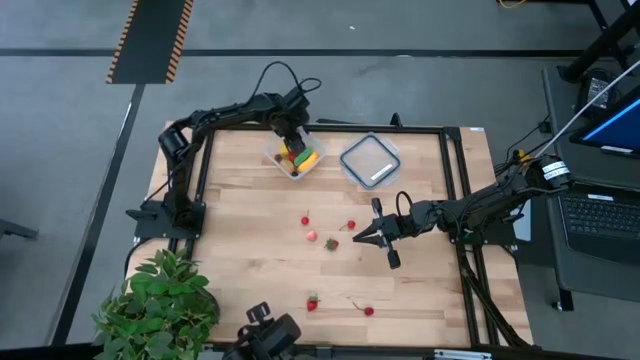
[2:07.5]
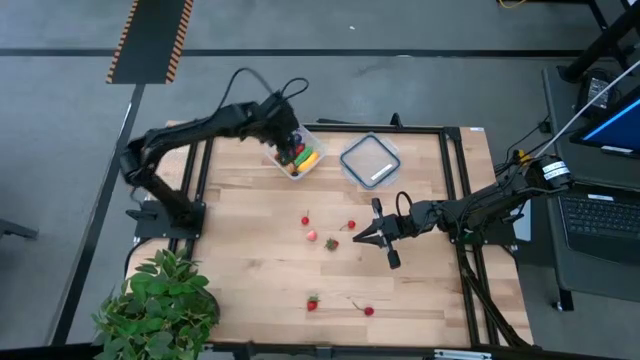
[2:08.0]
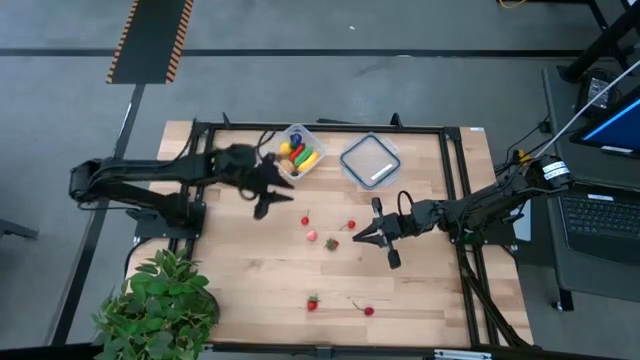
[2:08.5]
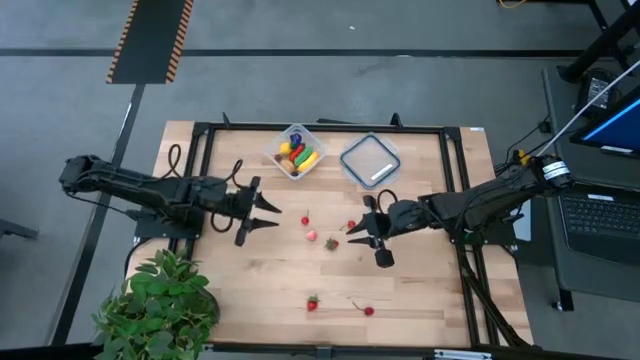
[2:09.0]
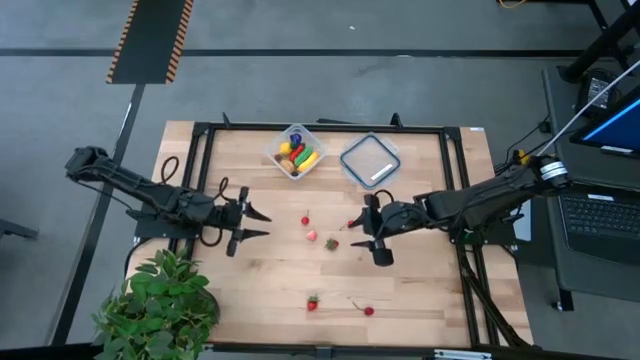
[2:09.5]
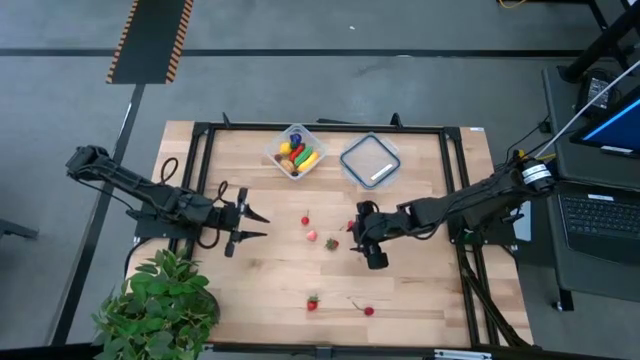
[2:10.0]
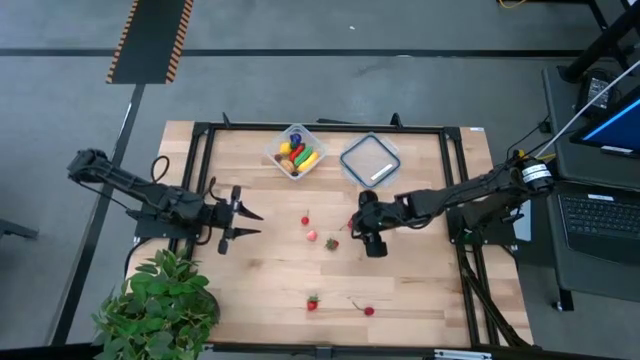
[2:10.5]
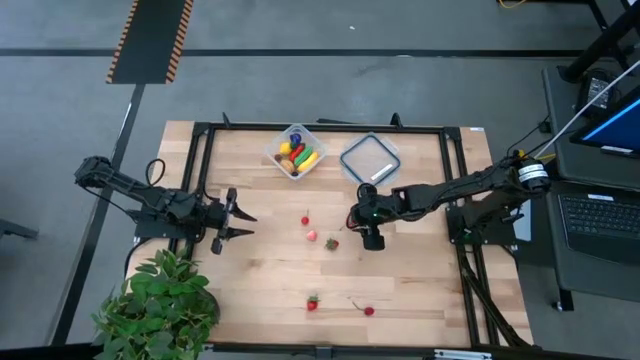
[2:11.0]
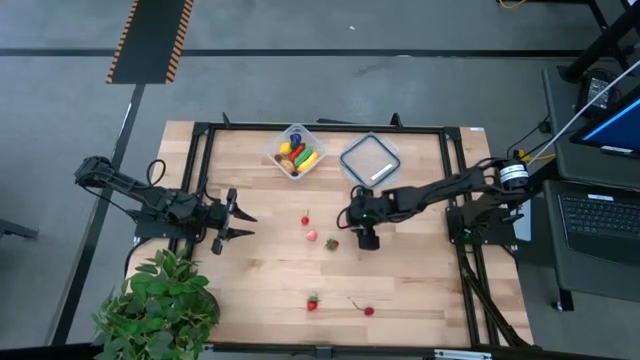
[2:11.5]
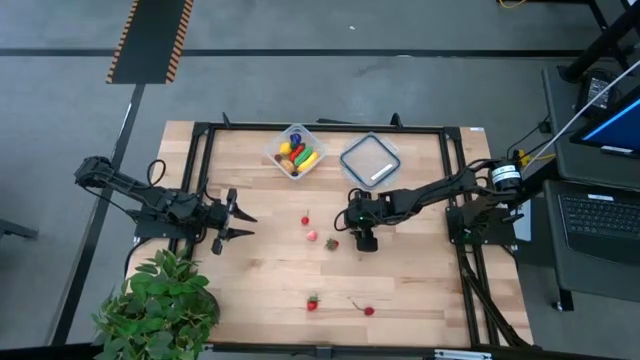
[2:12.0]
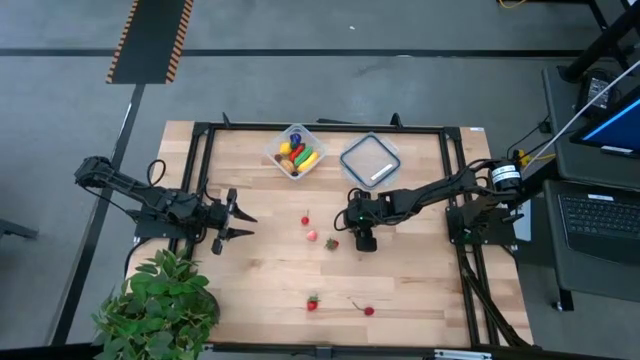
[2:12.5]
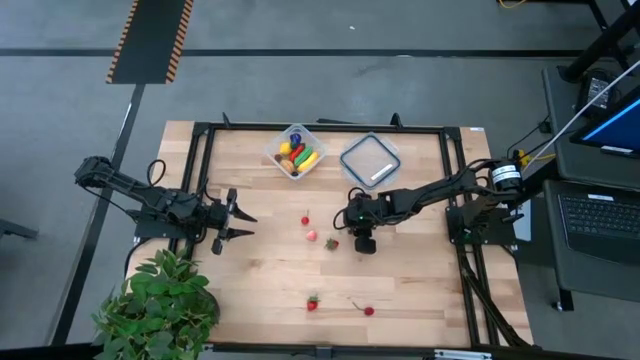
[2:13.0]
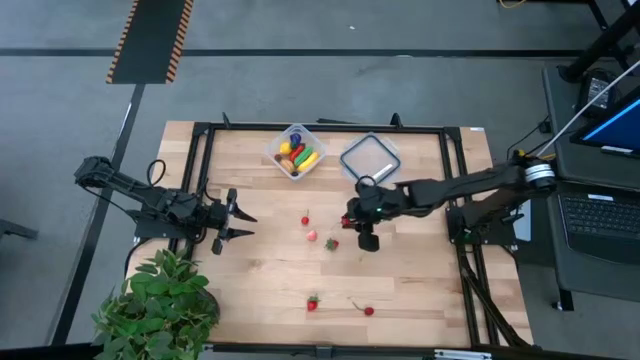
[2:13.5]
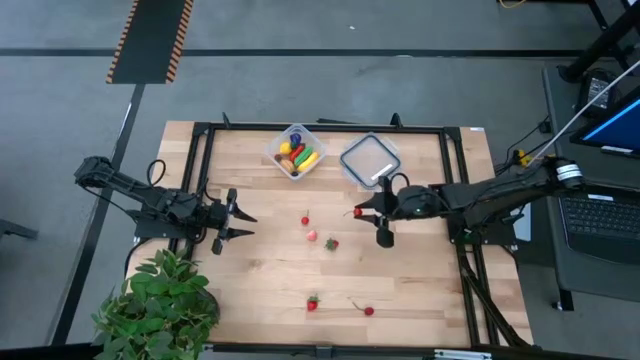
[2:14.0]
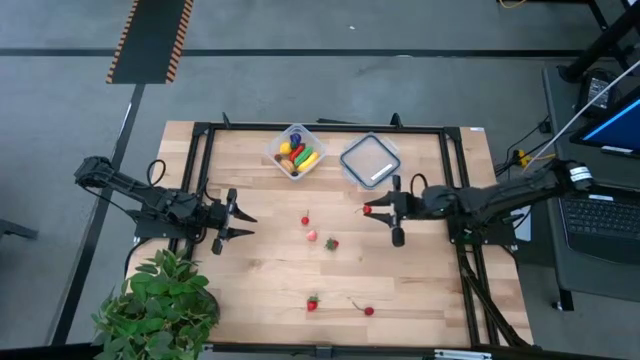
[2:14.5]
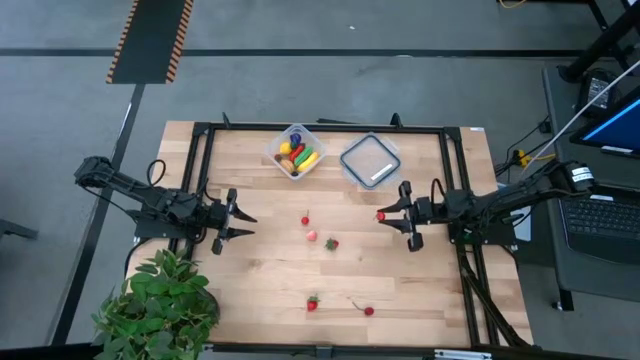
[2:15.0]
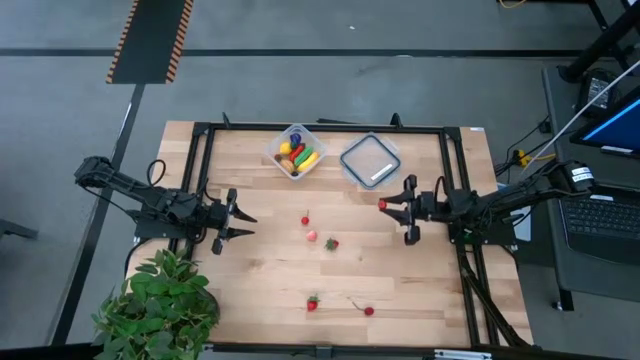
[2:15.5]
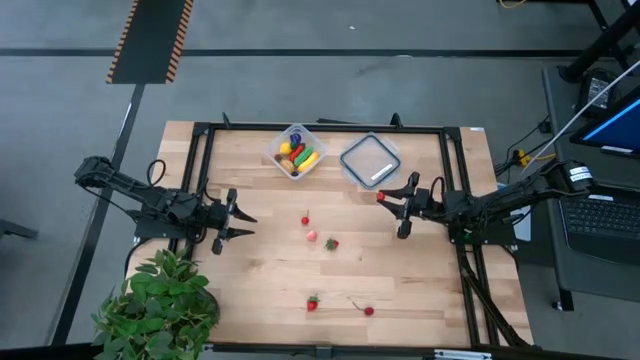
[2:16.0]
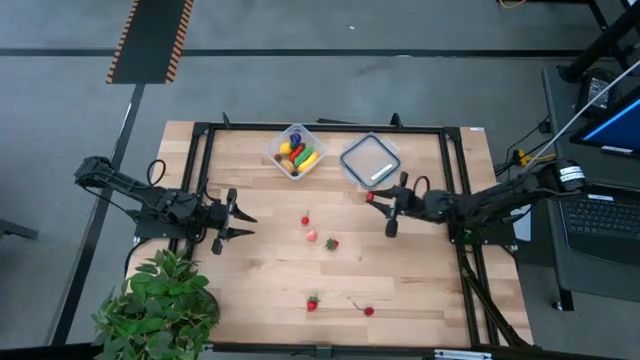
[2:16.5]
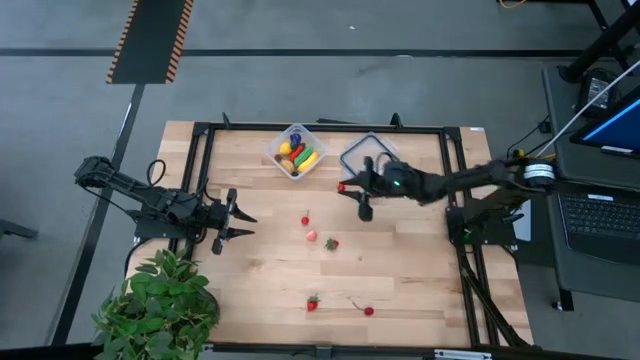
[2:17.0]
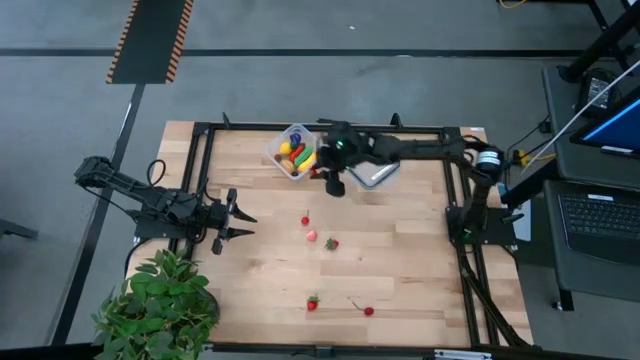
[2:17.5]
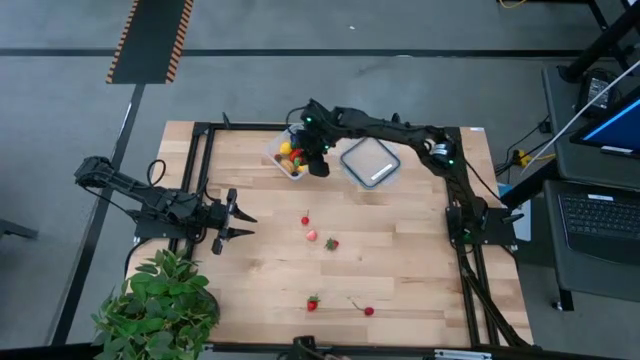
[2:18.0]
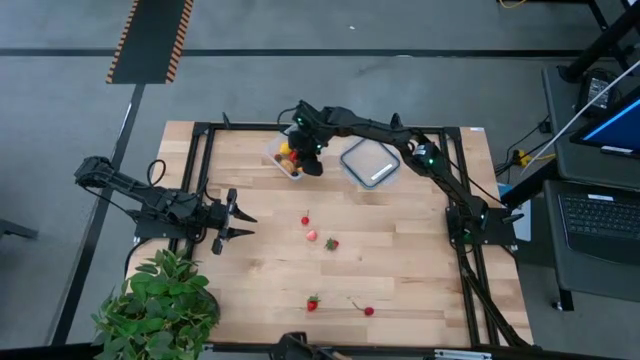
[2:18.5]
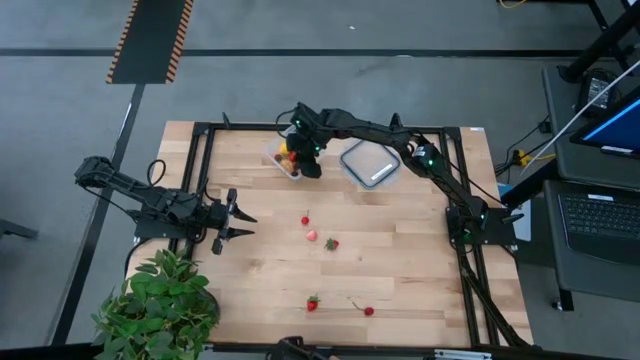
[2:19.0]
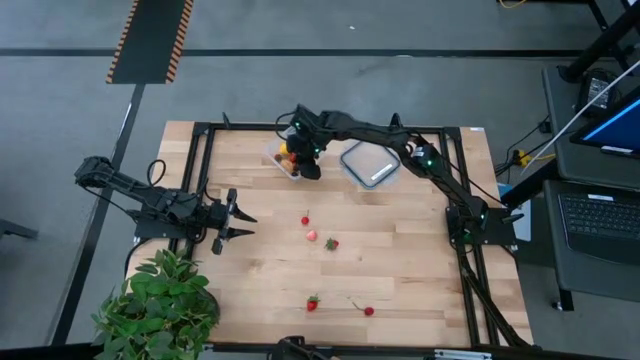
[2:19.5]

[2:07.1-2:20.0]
Task: Pick and placing Produce into tupperware
Put the top right cherry into the transparent container

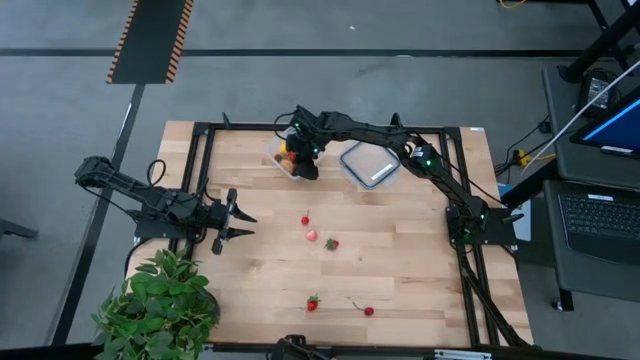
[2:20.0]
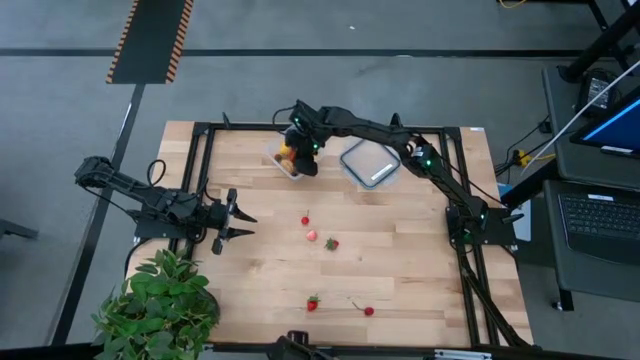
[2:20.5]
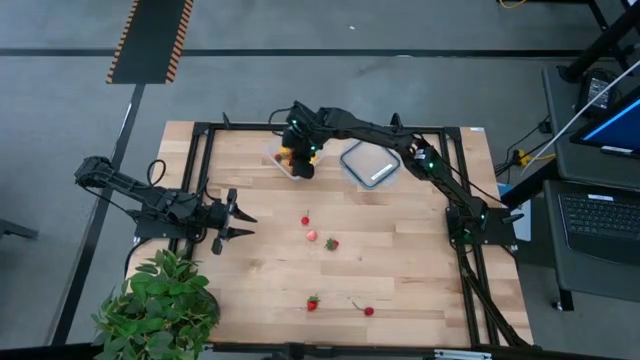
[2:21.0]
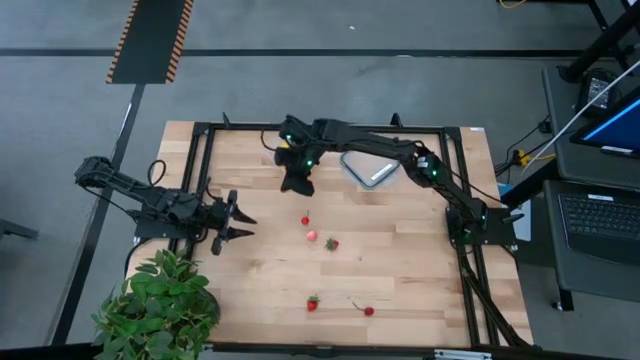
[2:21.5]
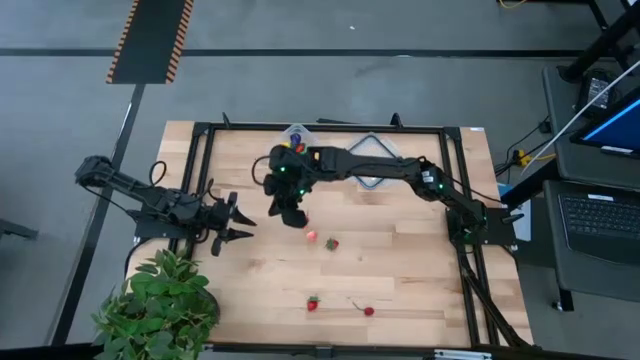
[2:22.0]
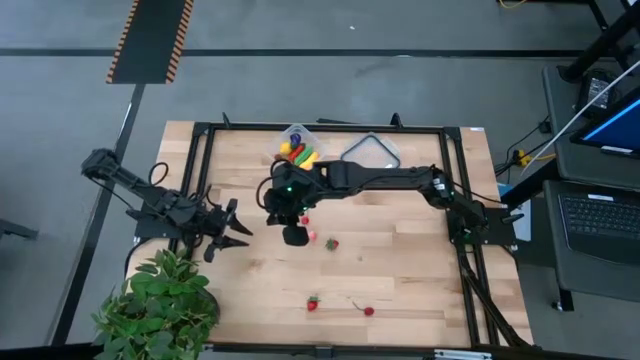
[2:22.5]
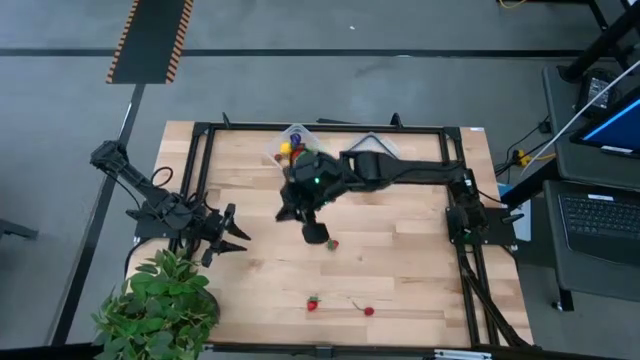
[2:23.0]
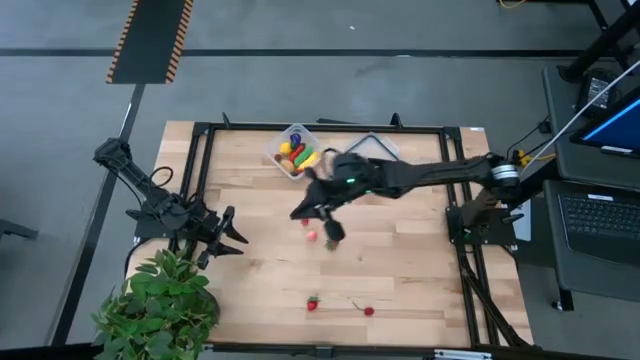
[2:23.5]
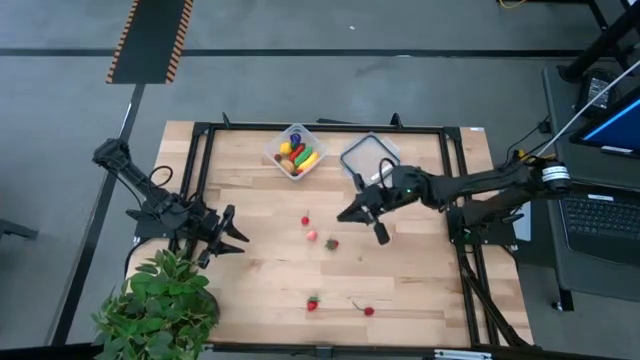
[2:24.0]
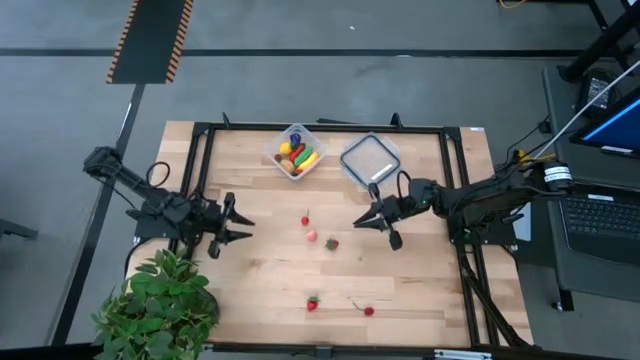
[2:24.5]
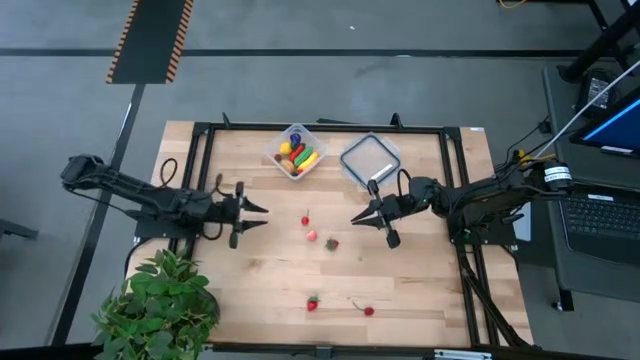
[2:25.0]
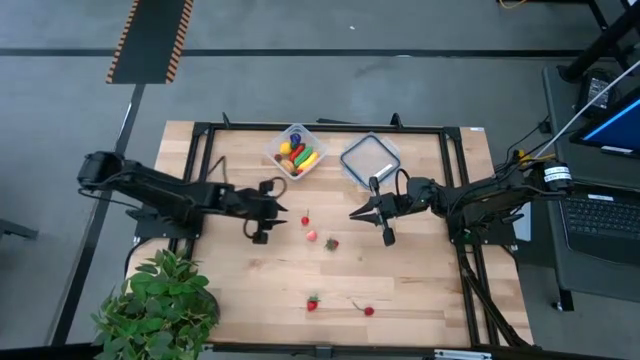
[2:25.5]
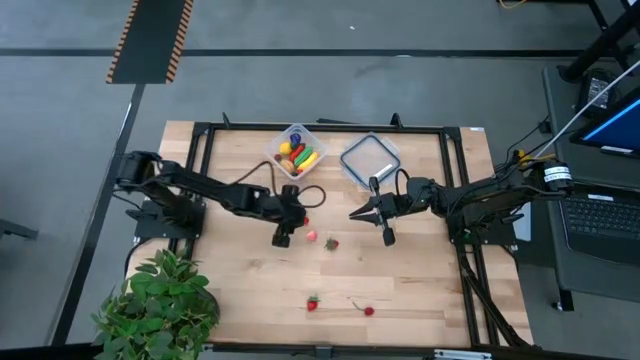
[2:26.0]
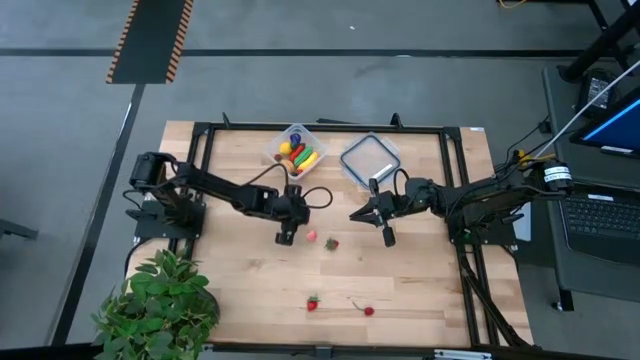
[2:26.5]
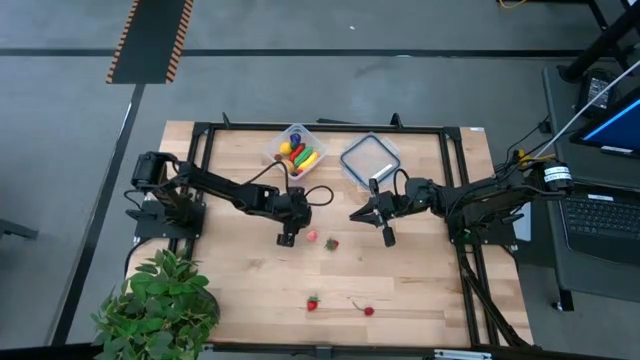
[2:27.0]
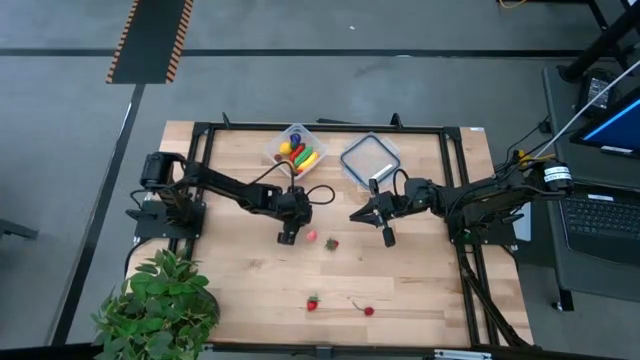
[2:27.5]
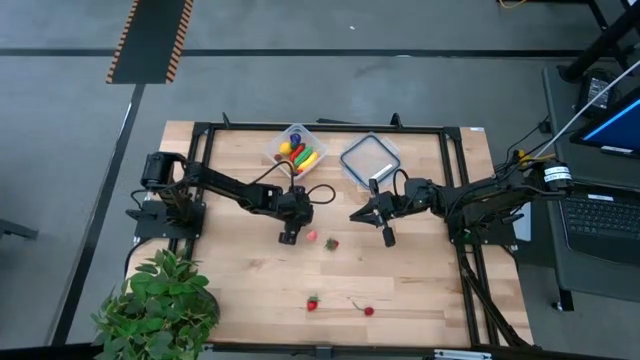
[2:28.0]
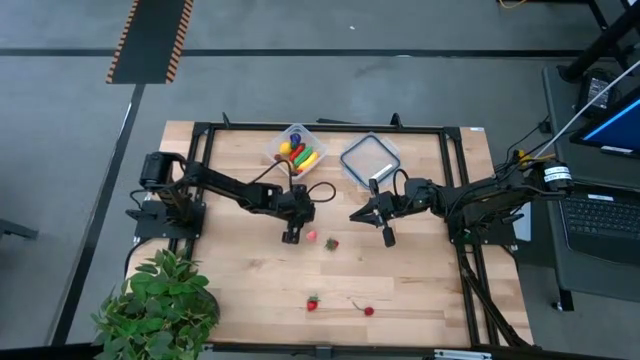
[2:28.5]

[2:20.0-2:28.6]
Put the top cherry into the transparent container
